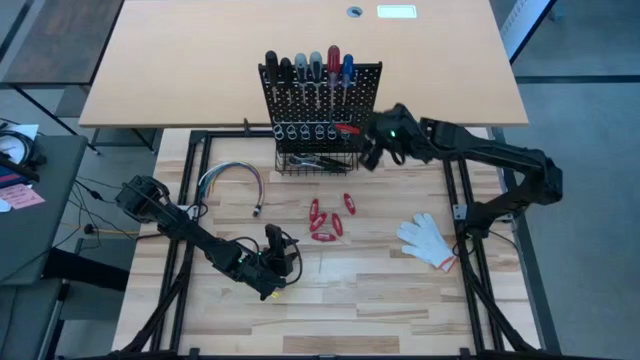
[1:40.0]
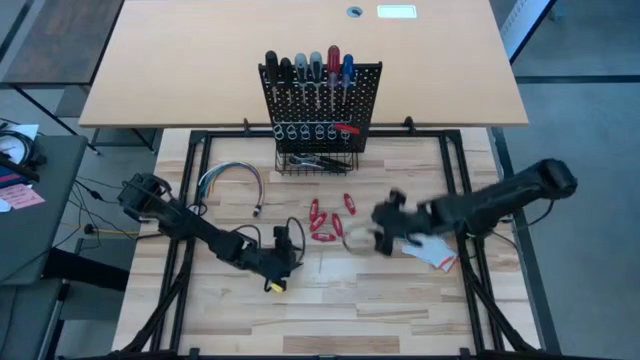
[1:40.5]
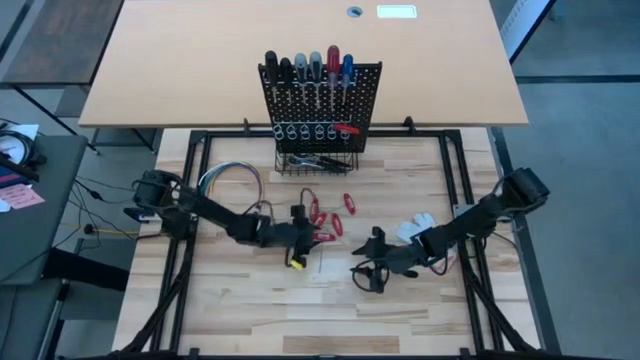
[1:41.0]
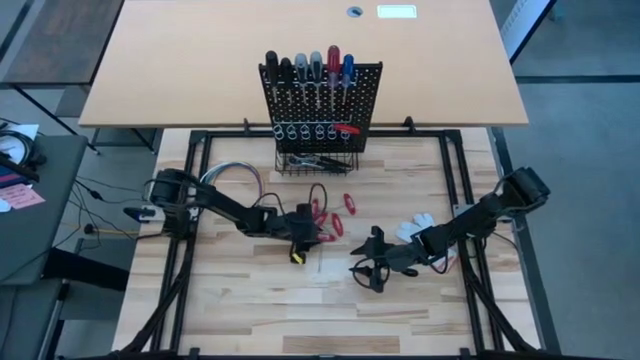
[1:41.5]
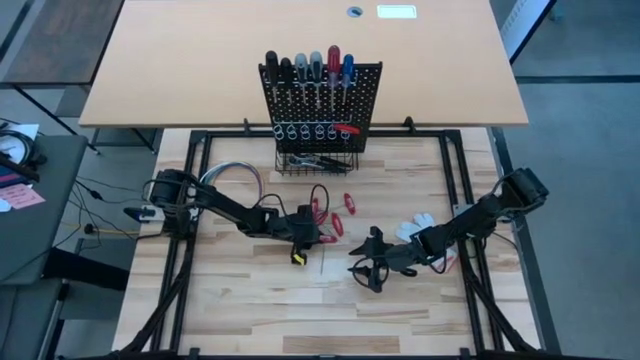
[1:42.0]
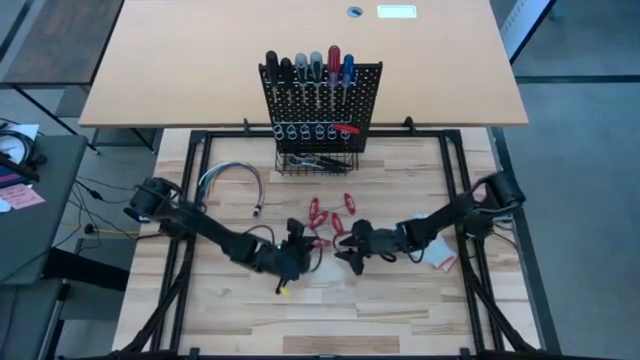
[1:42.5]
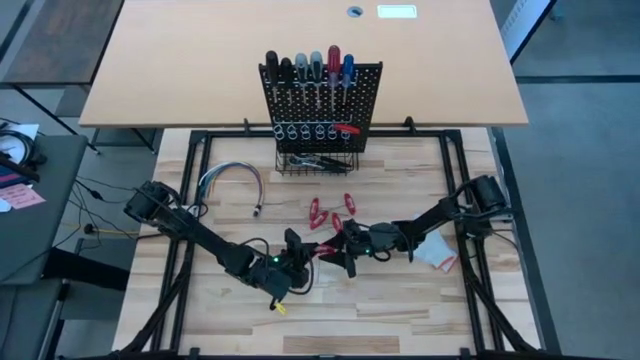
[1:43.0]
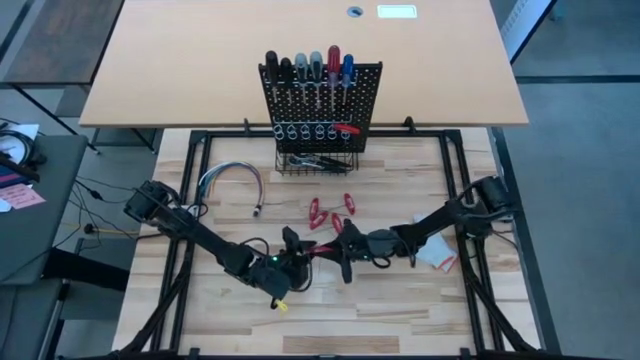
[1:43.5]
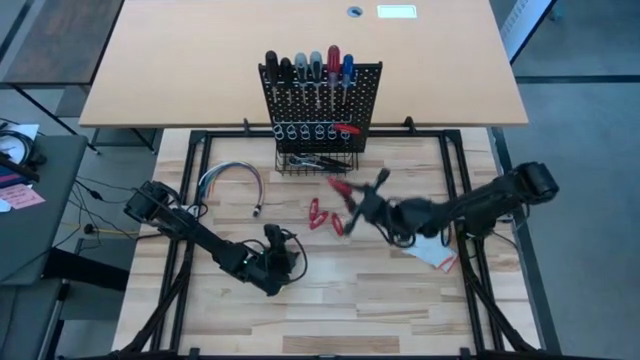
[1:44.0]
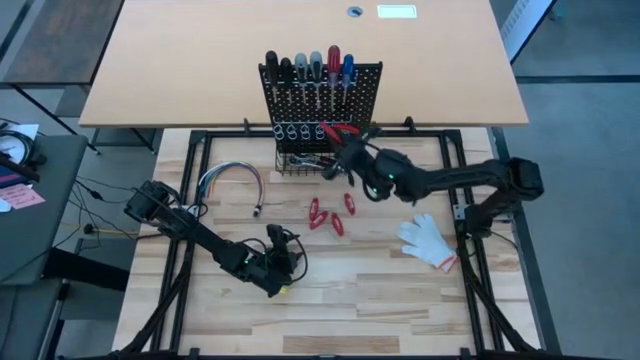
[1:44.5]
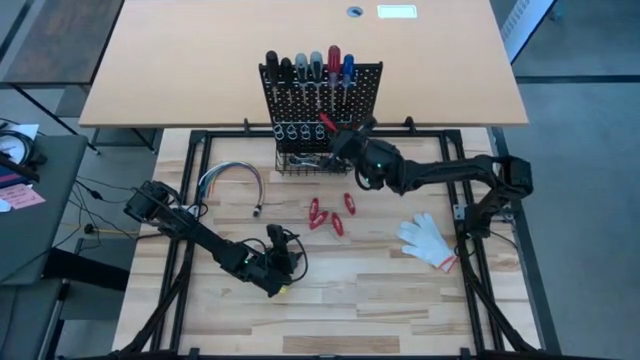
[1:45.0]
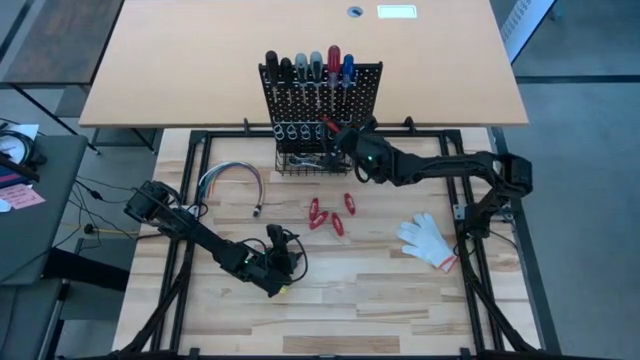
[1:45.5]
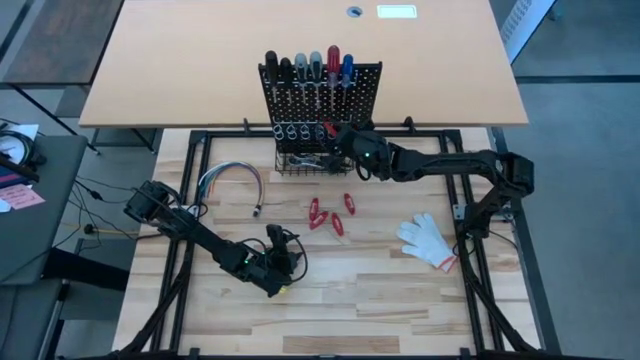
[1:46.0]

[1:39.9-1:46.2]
Task: Hang tools onto peg board
Hang the red allen wrench on the pegboard

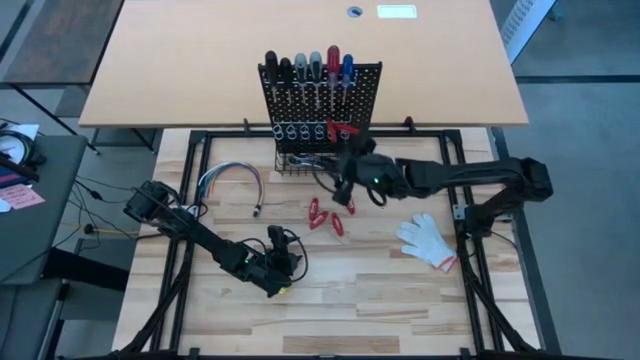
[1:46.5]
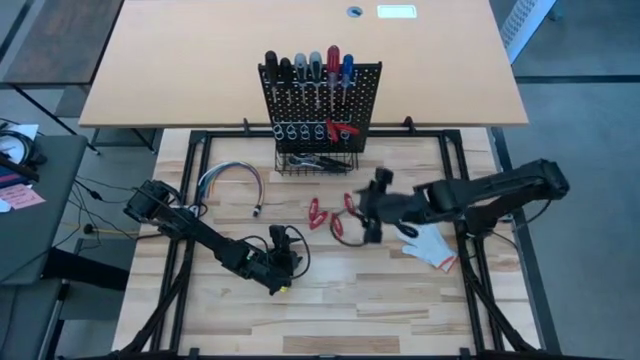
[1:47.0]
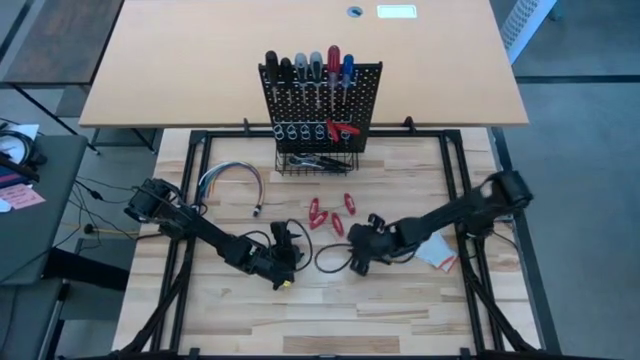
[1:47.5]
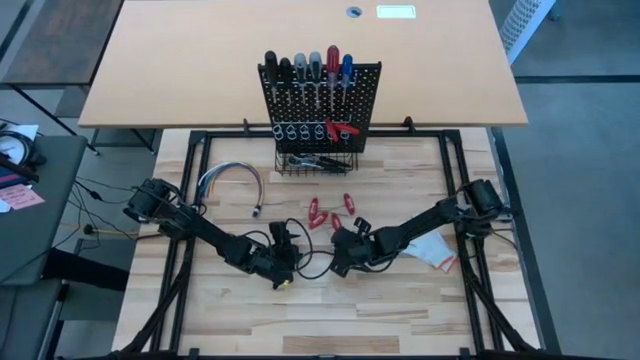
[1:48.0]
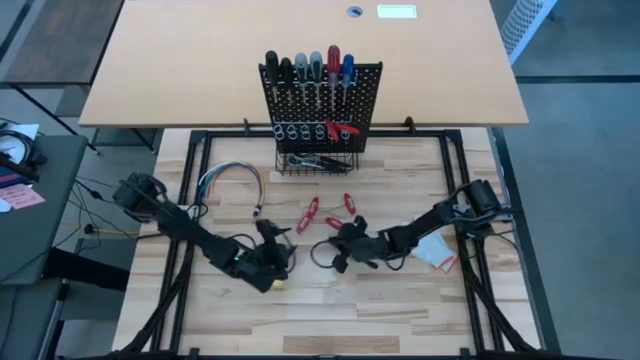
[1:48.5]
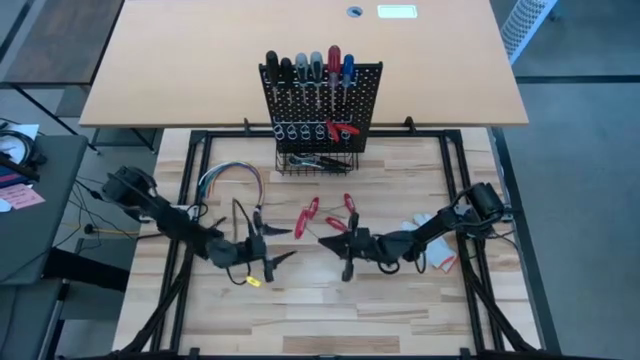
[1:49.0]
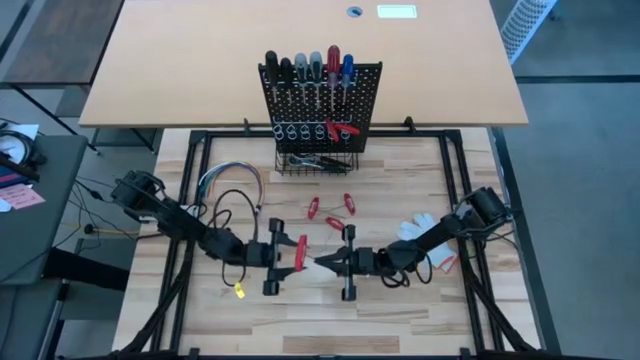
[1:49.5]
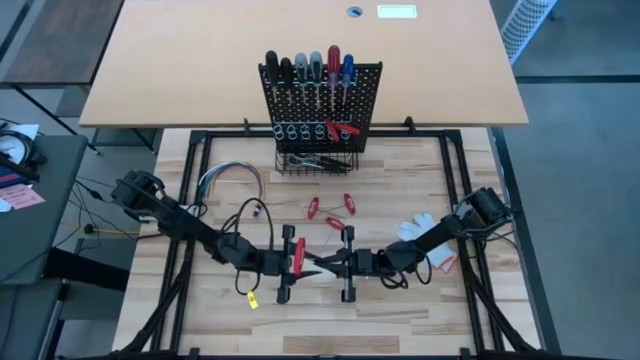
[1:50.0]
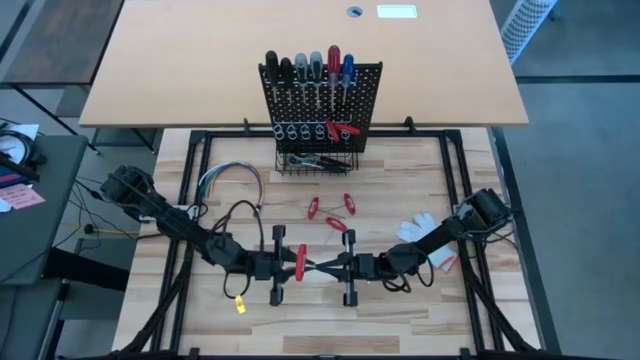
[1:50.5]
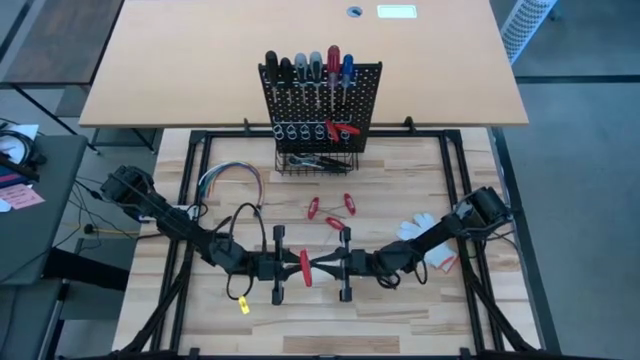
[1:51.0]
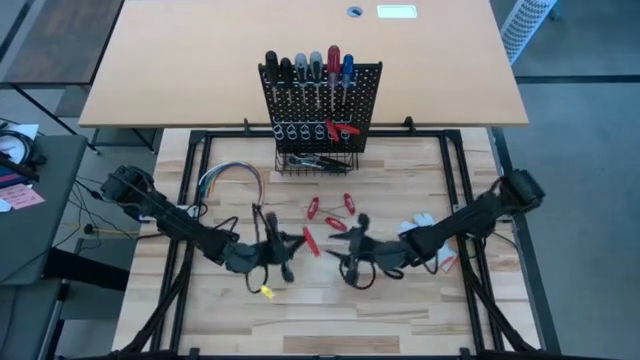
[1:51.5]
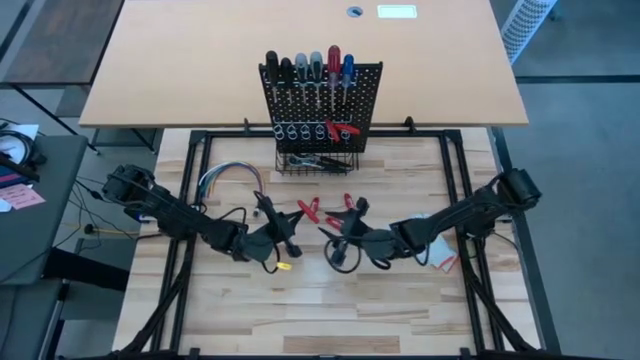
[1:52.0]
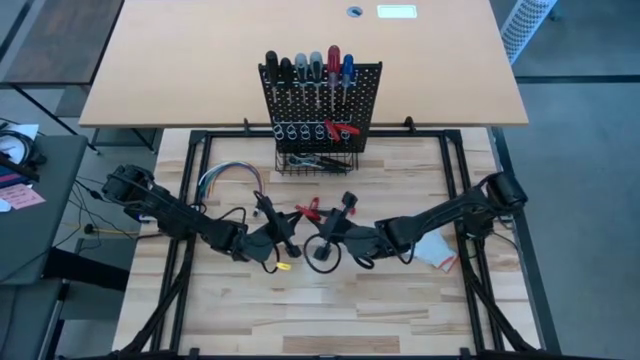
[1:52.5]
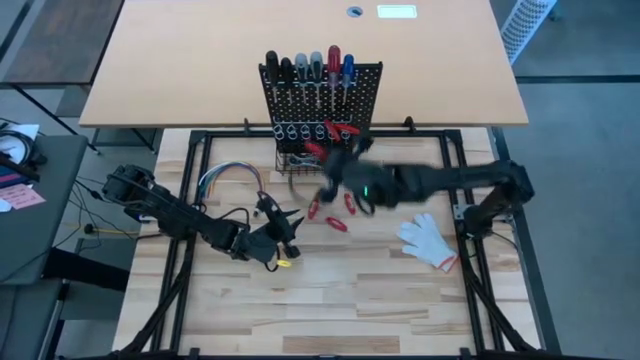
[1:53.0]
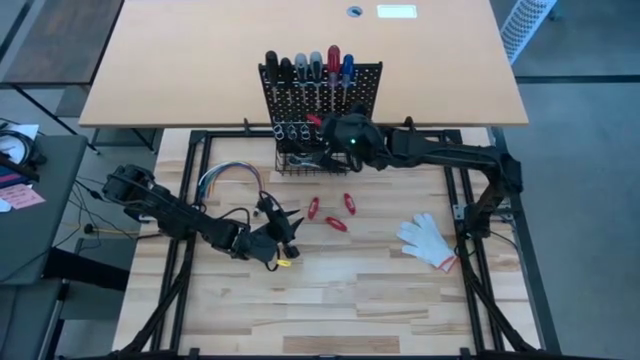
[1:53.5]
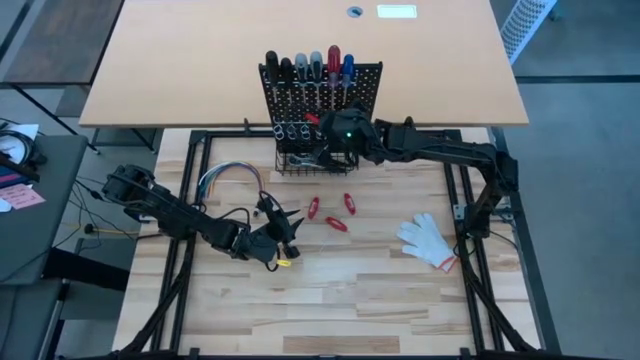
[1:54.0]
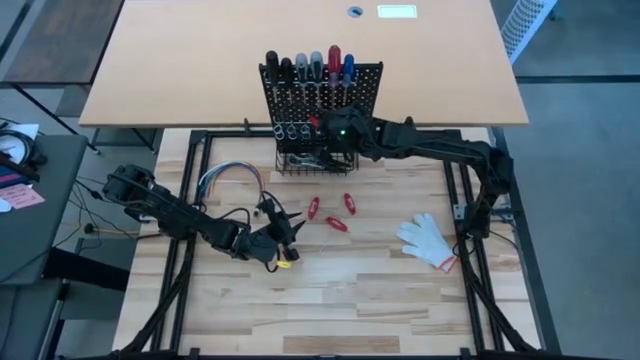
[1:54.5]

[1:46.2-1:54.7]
Hang the red allen wrench on the pegboard

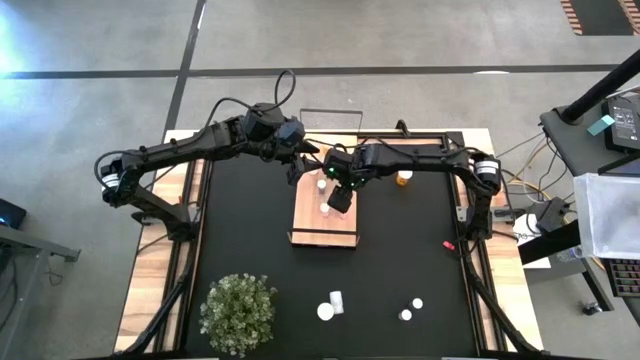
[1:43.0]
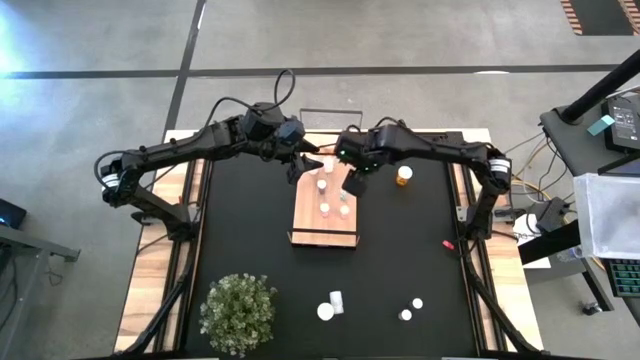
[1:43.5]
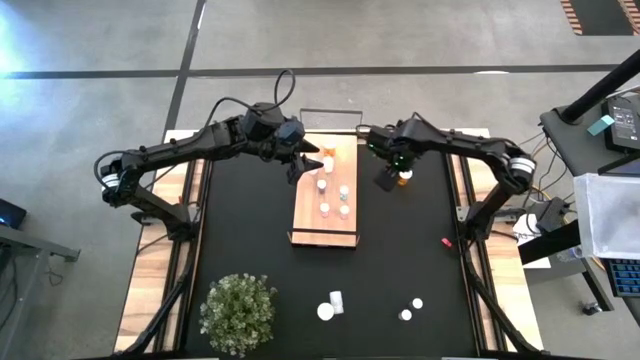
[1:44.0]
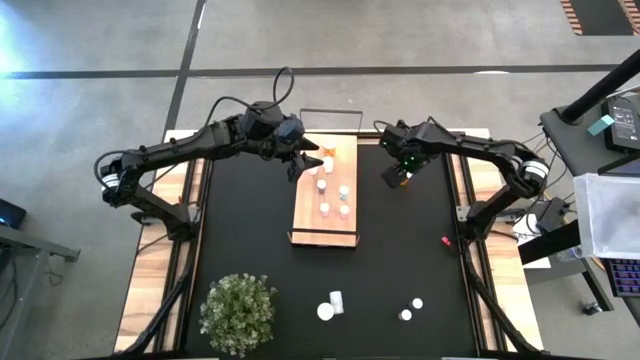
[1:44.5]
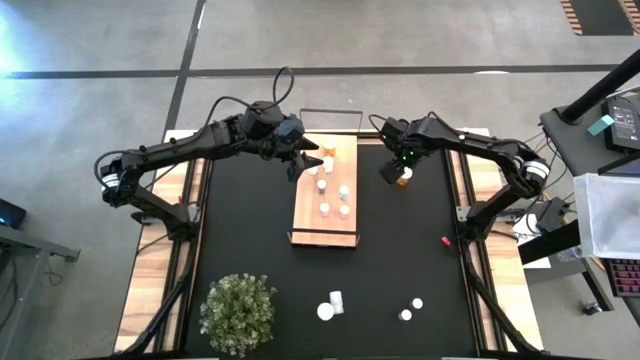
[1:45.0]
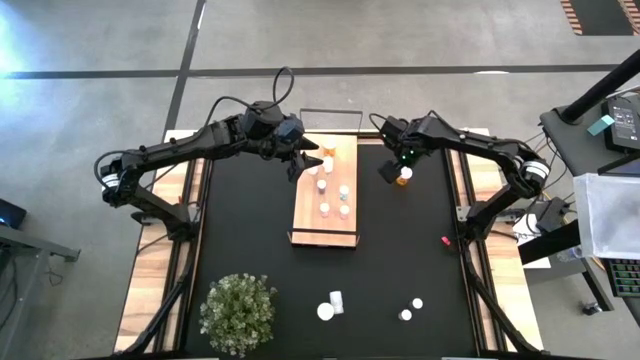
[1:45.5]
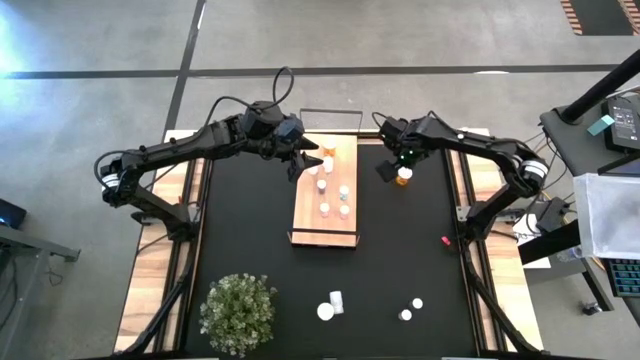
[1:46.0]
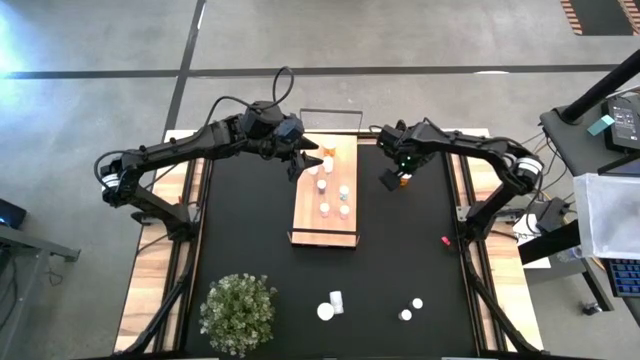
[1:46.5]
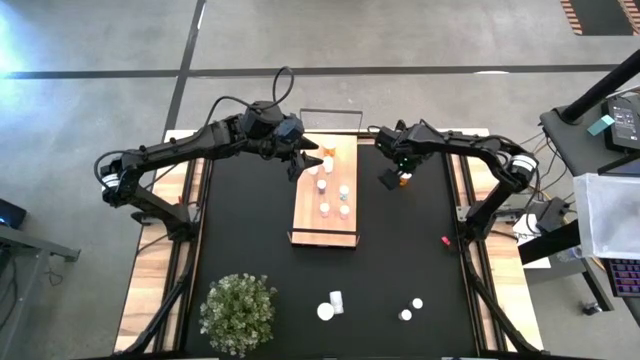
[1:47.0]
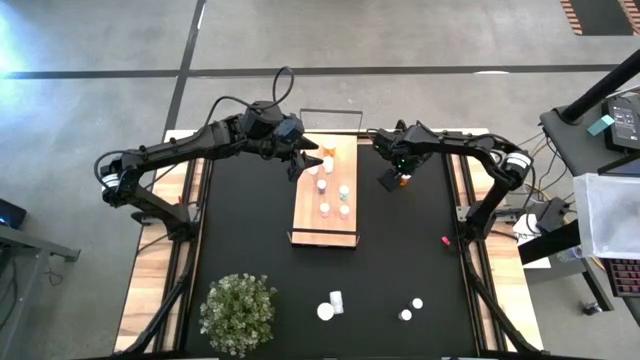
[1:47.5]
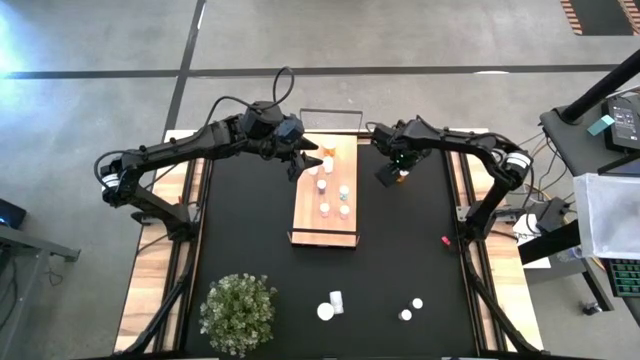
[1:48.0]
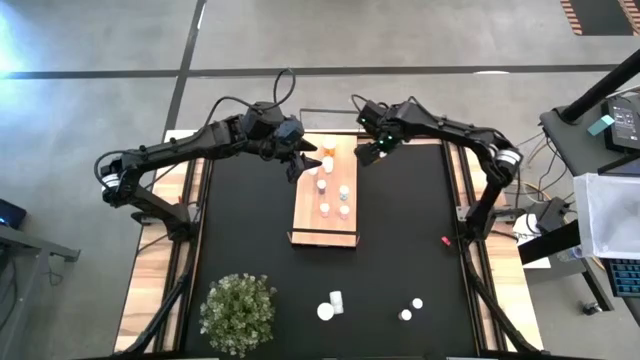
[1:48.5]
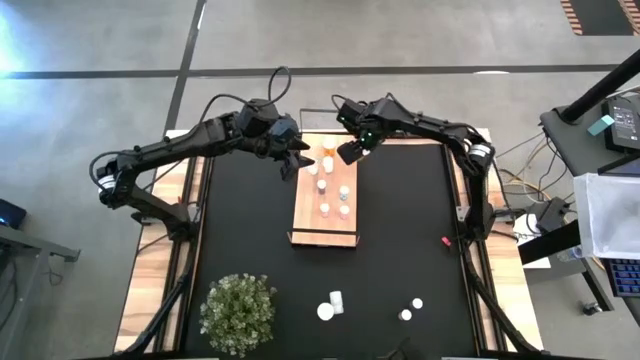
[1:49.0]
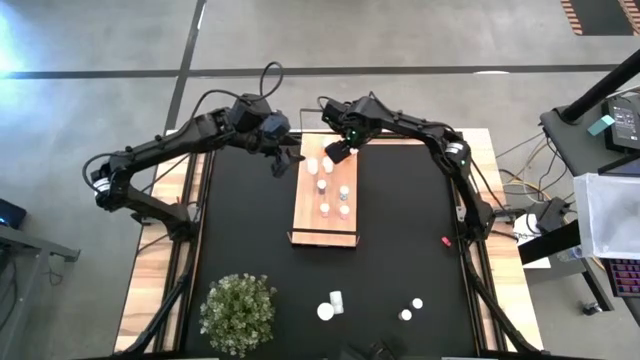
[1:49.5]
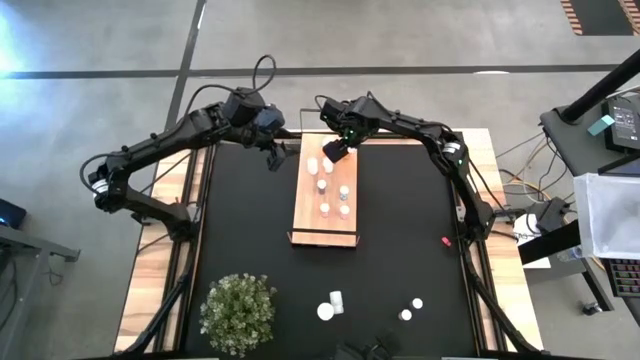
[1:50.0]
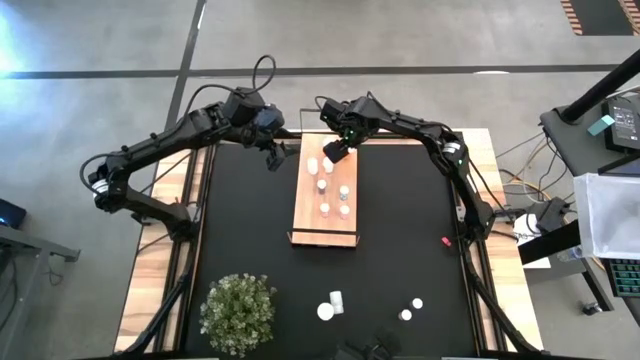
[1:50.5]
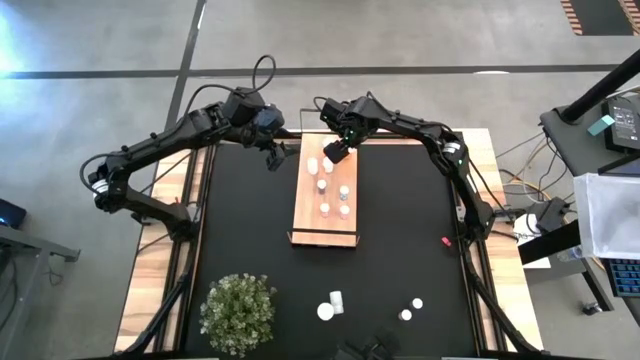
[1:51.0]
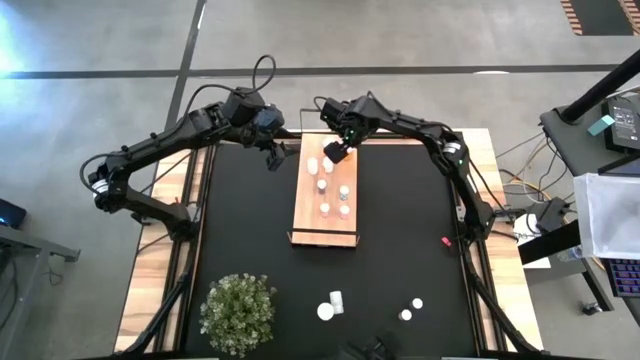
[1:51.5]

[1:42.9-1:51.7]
Task: Pick and place medicine bottles onto shelf by color
Put the top orange pill bottle on the shelf aligned with the other orange pill bottle
